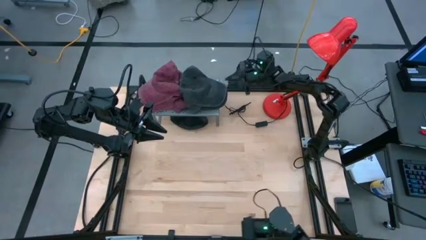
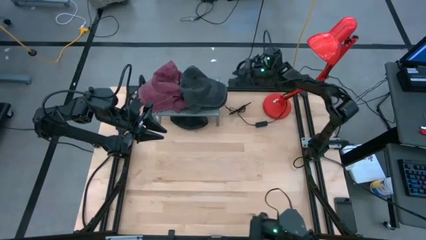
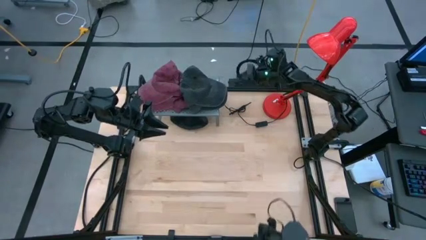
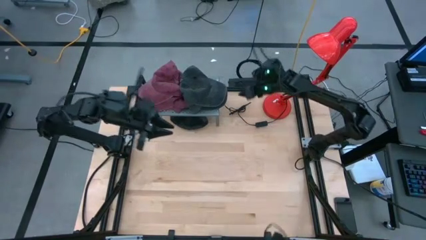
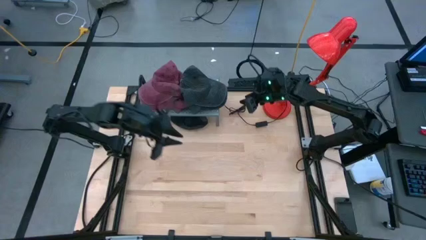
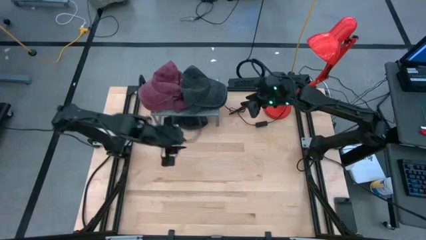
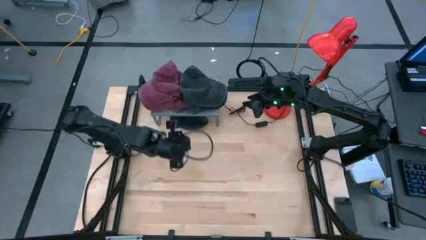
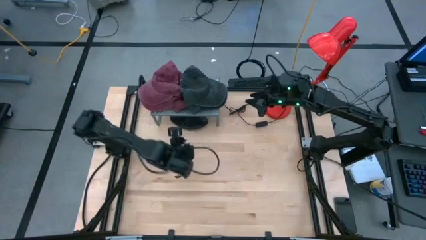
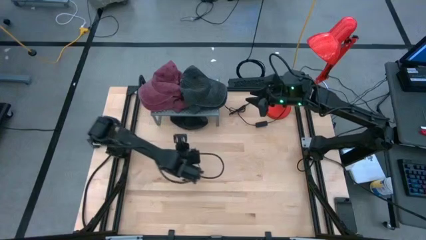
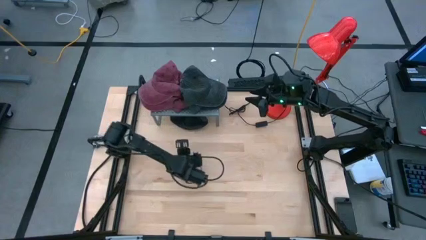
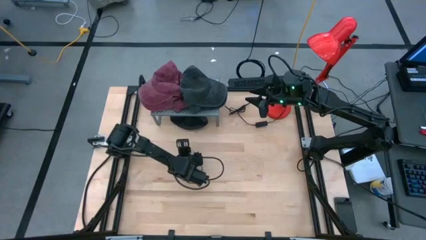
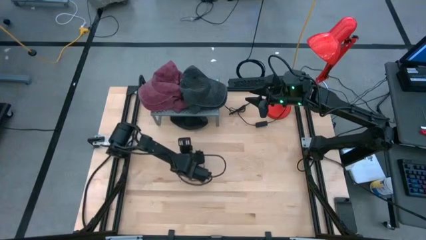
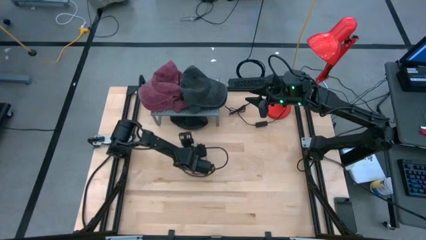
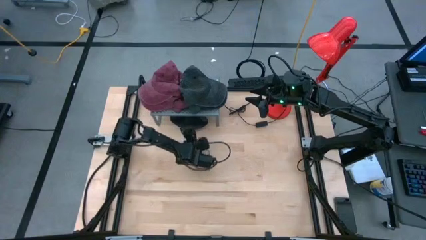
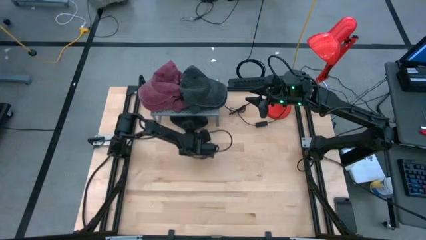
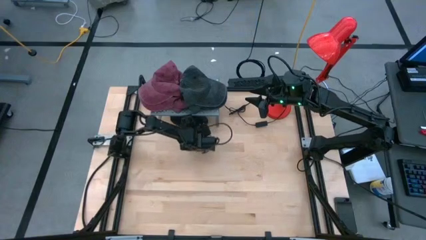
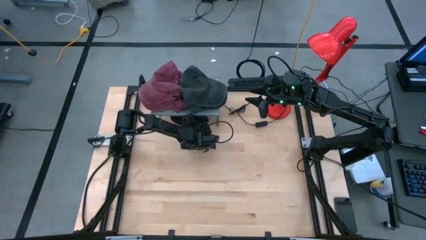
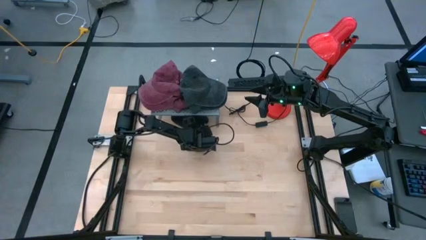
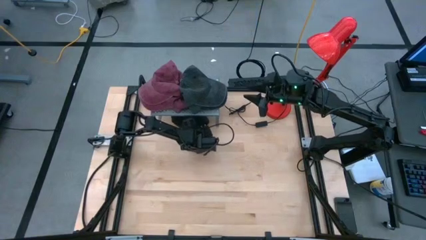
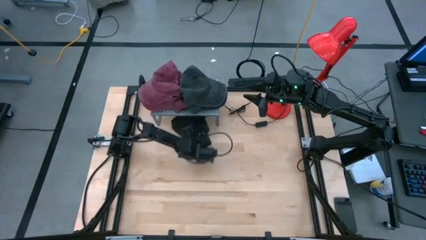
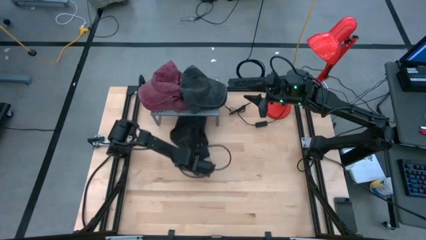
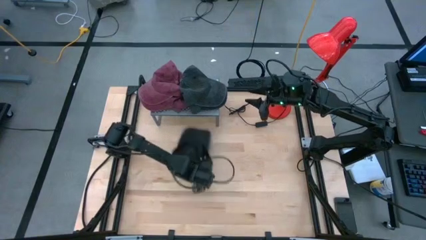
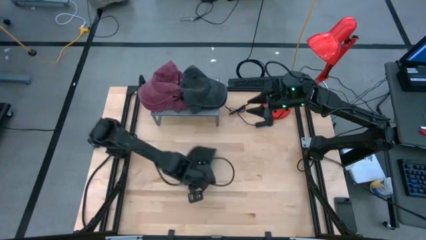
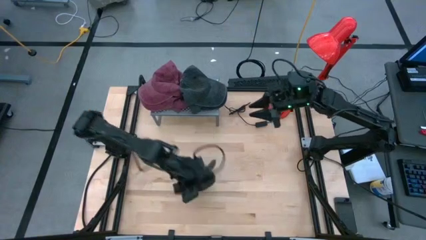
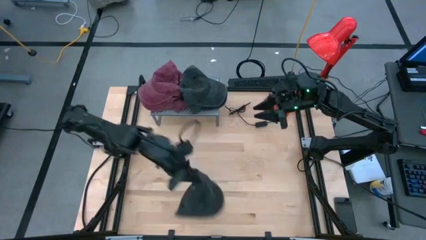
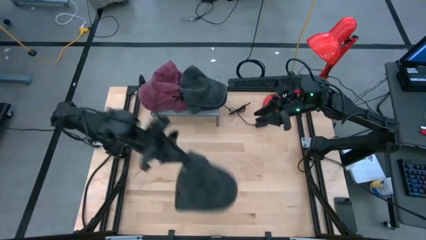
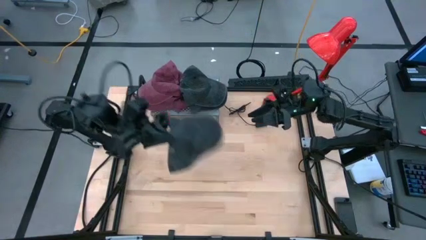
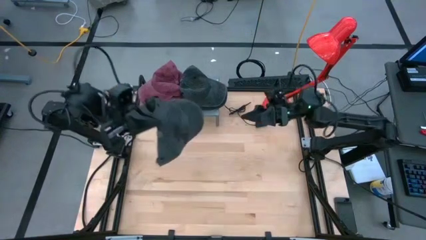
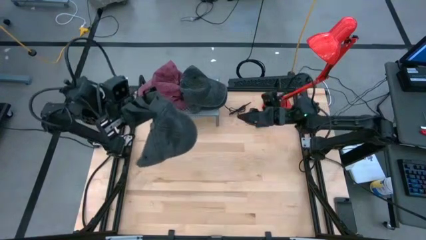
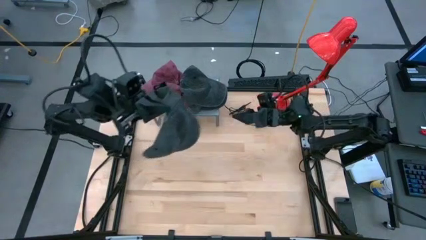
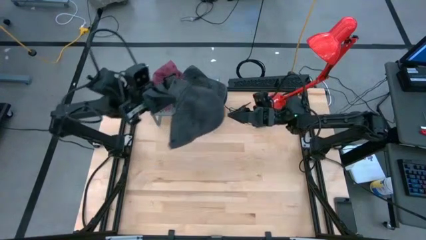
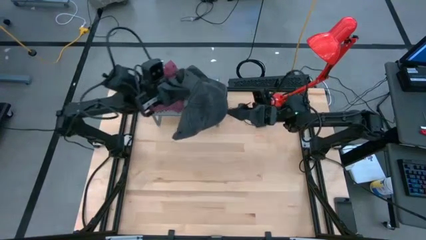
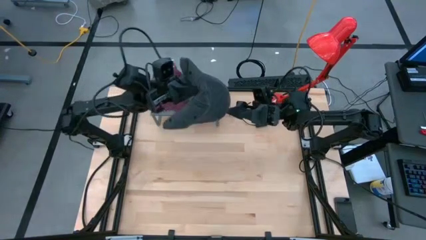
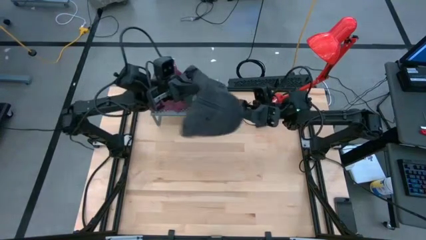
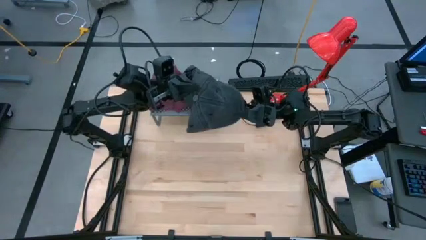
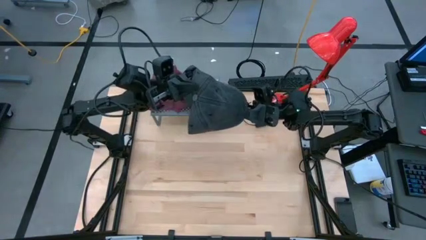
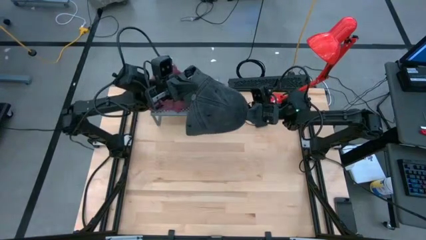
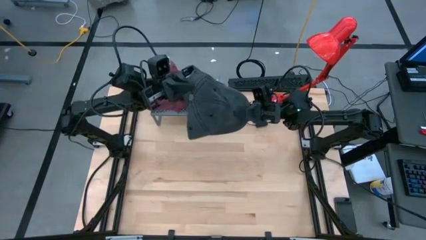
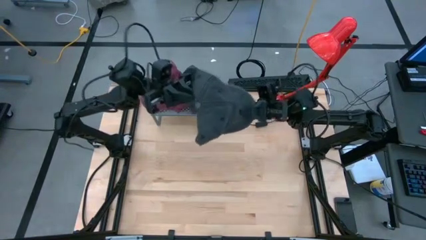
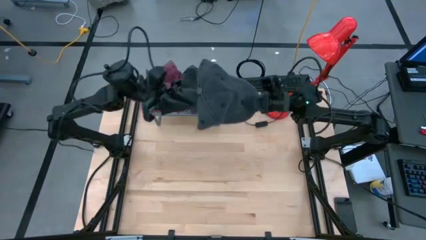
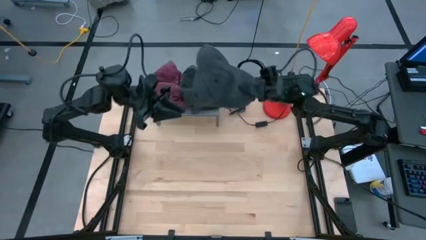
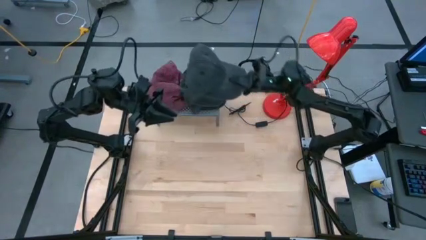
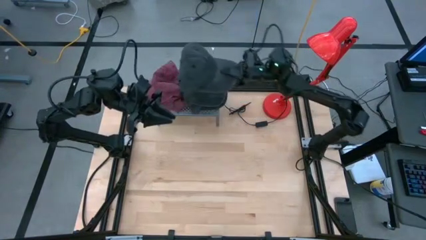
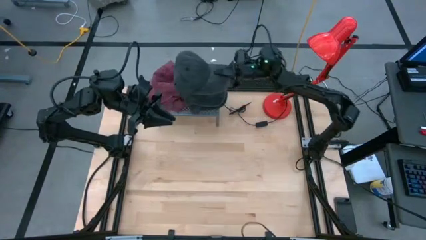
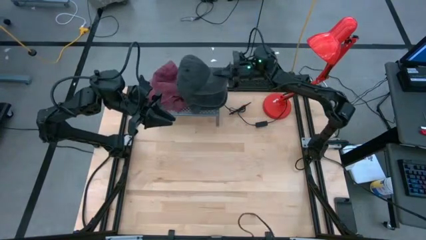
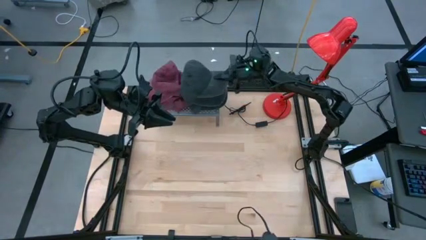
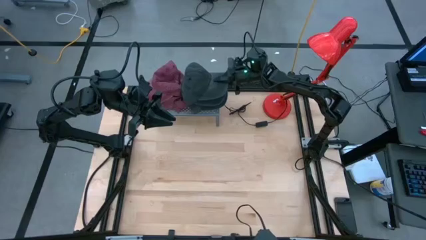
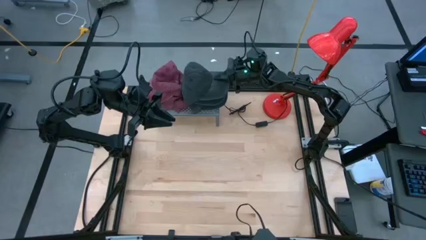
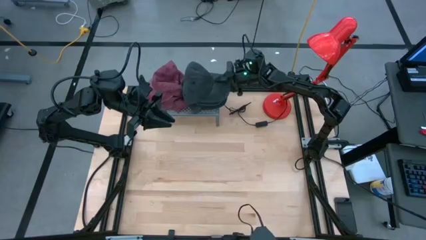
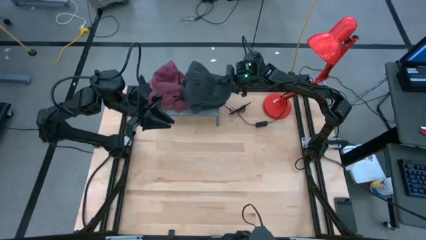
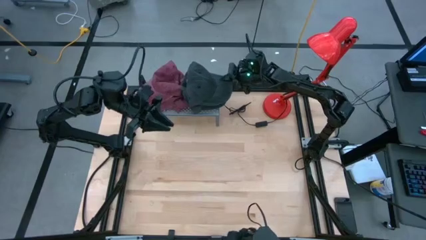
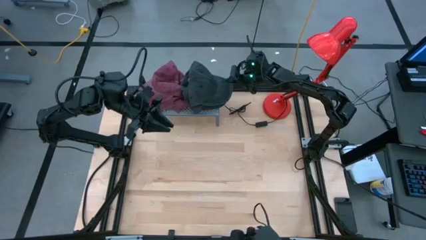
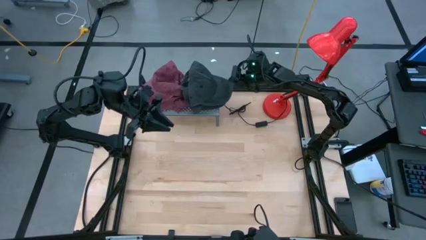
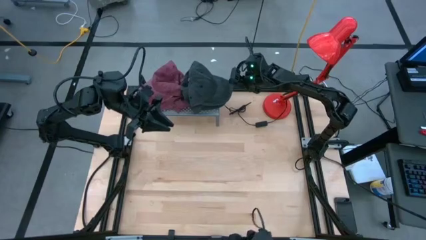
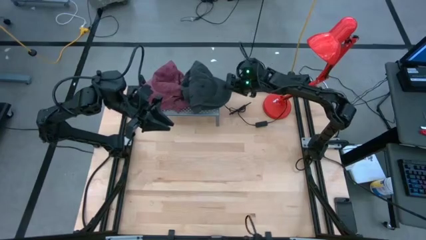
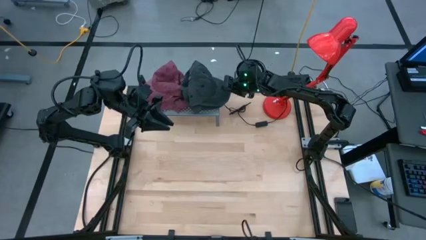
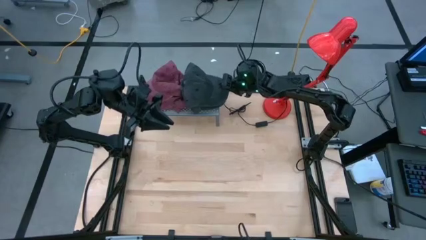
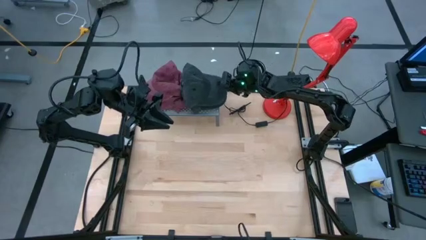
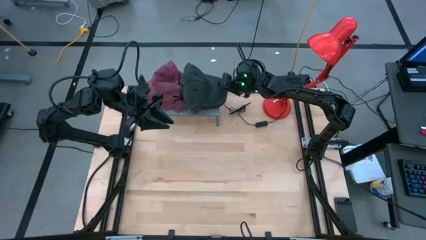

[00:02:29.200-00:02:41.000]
Task: Pick & Place hat
Stack the black cap on top of the black cap on the shelf

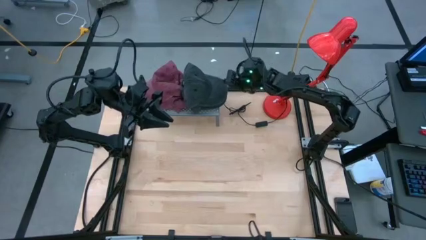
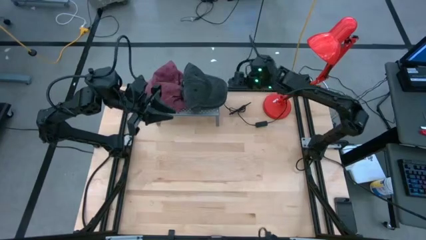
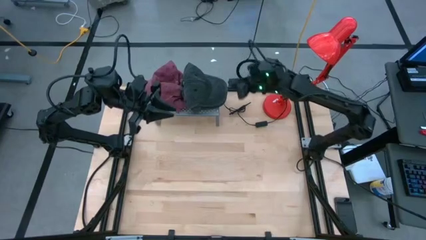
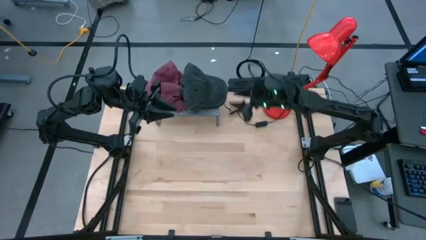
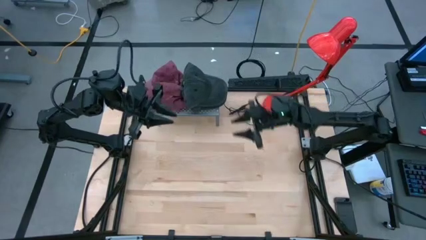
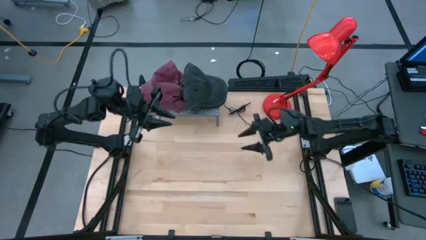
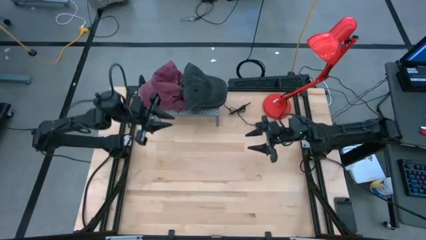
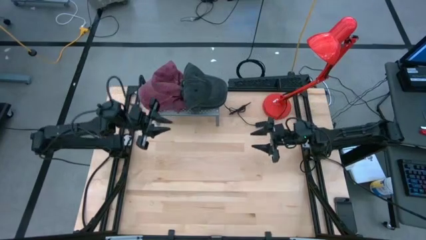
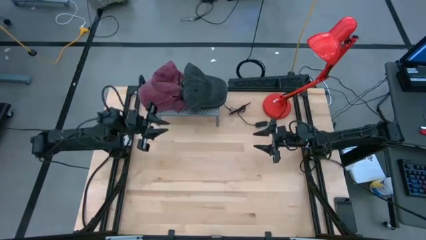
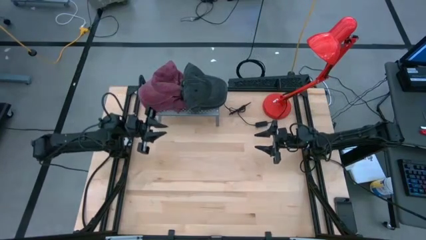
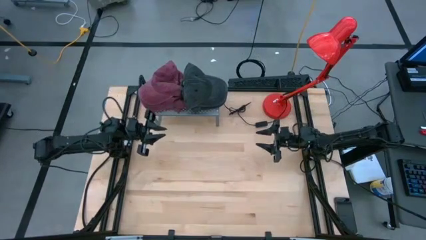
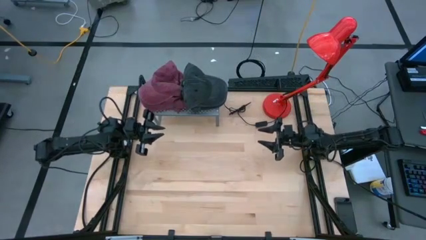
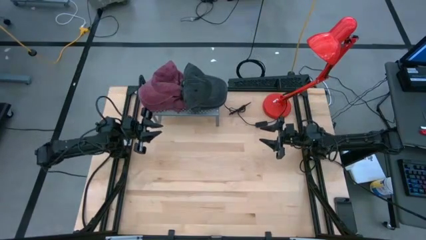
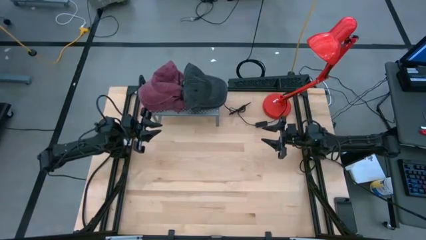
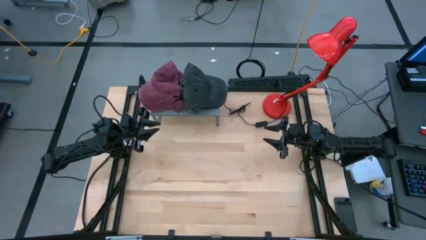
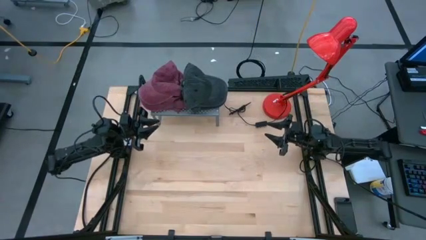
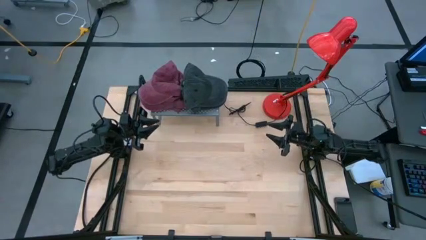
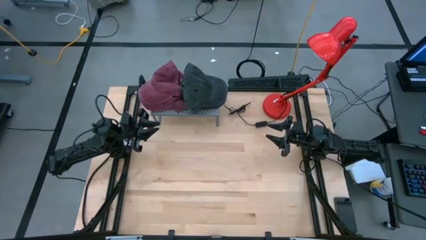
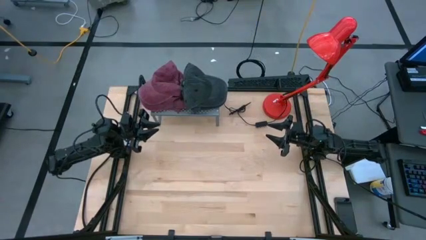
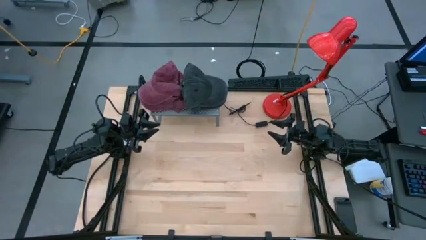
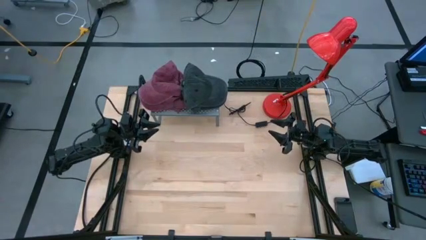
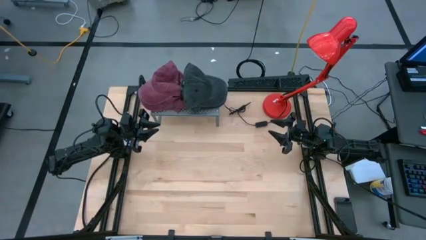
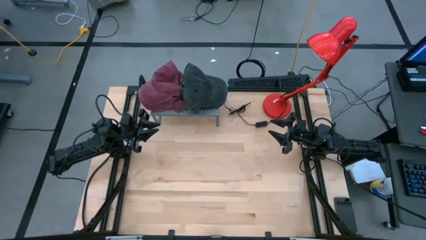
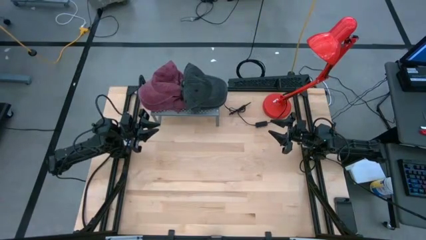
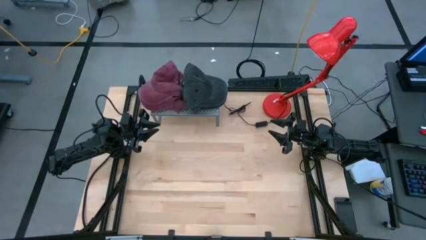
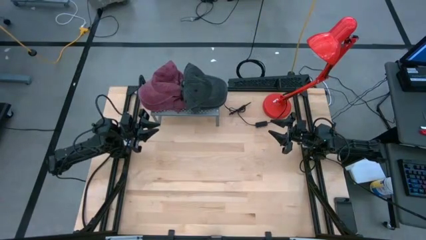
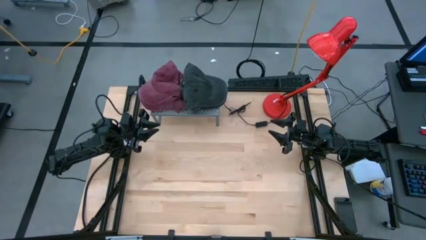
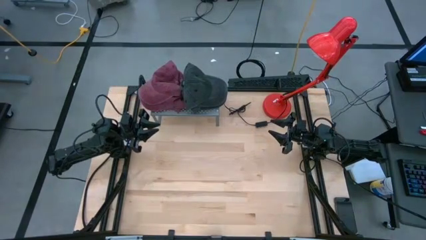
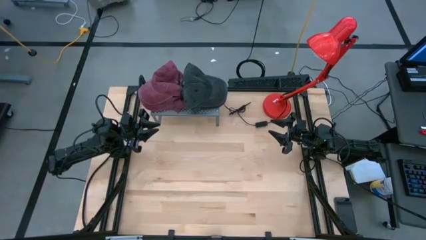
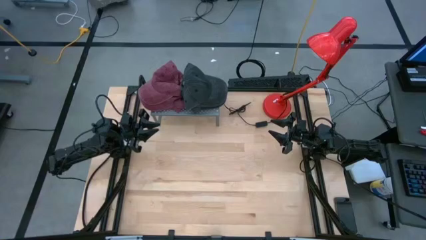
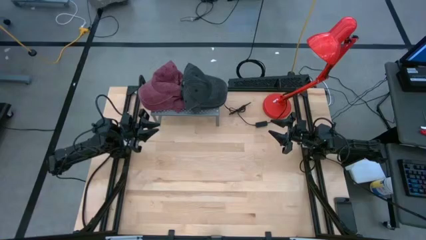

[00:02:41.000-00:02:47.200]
Return to Home Position
